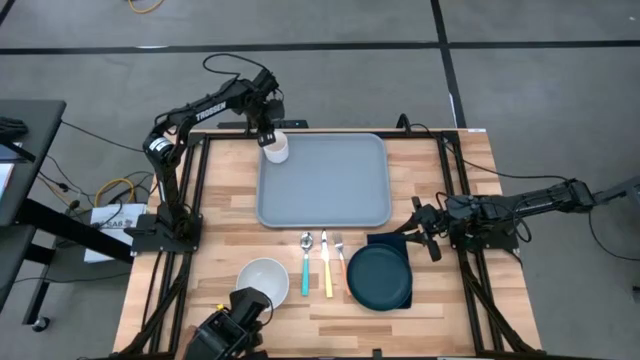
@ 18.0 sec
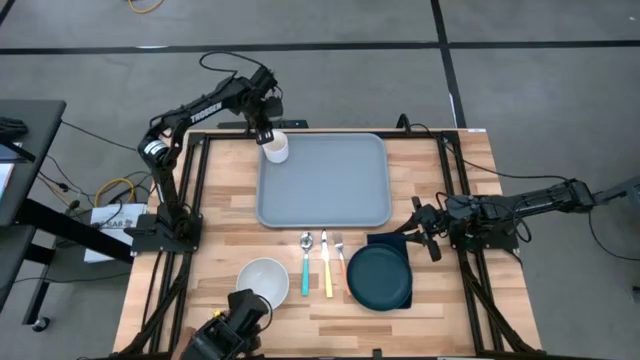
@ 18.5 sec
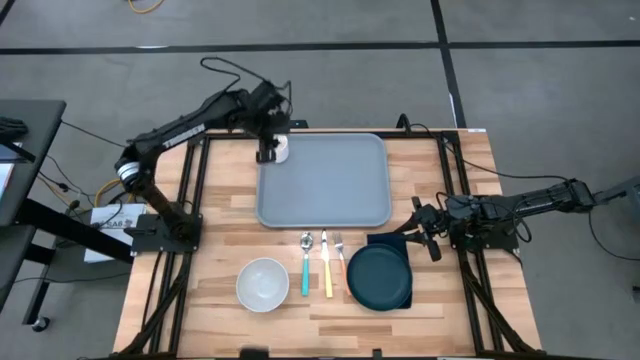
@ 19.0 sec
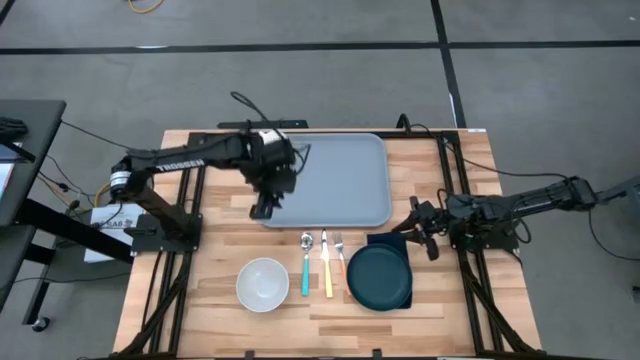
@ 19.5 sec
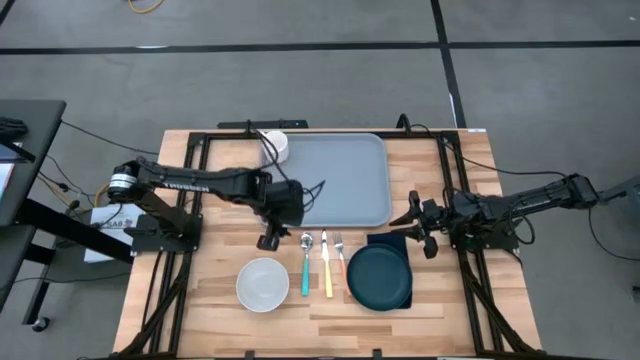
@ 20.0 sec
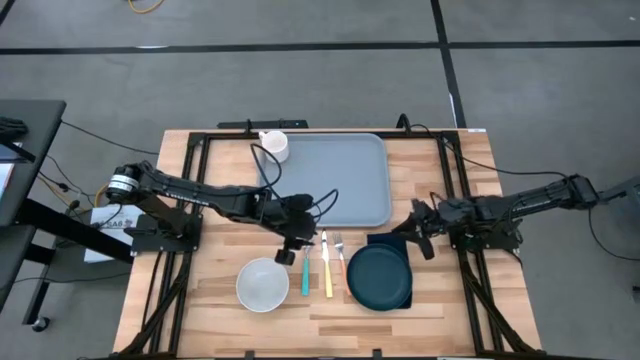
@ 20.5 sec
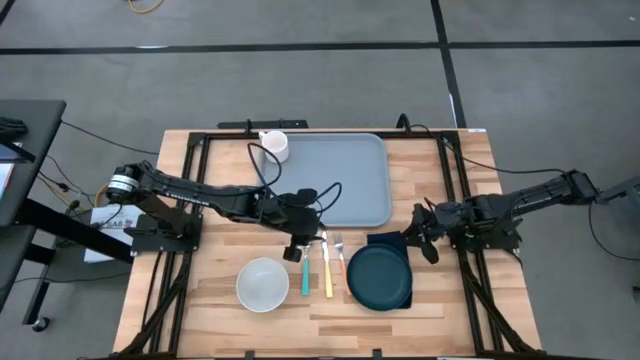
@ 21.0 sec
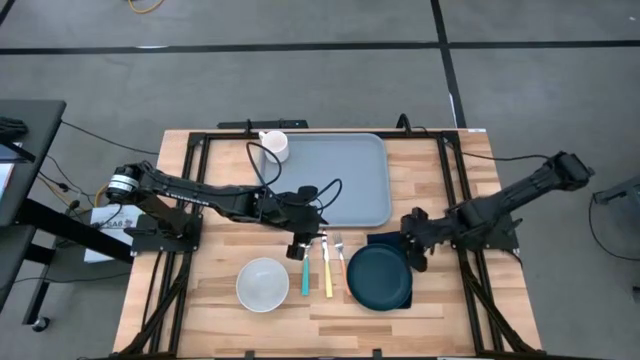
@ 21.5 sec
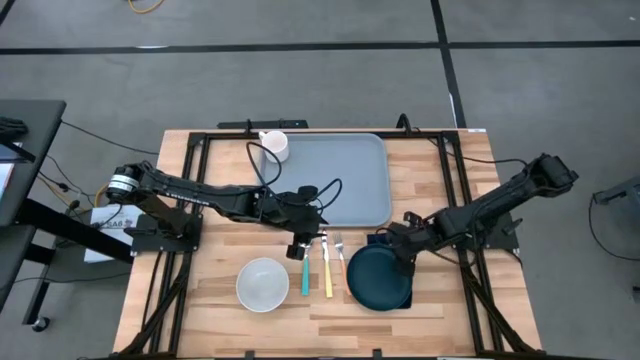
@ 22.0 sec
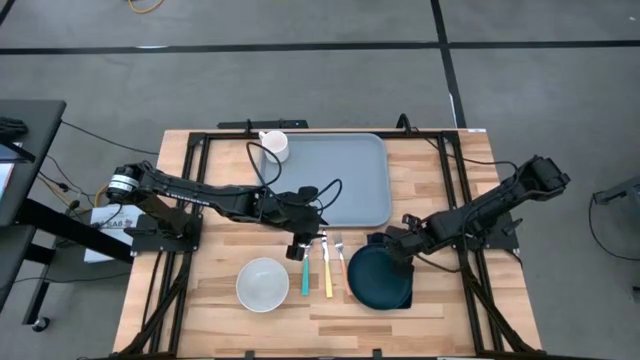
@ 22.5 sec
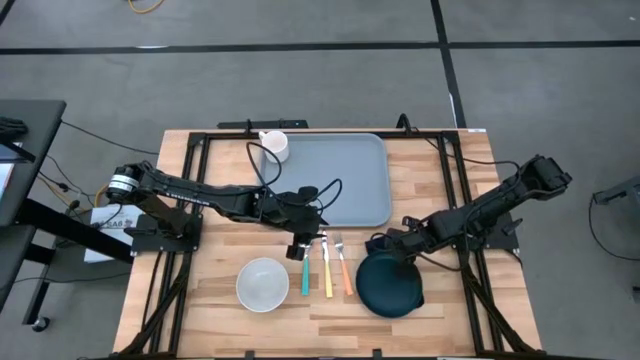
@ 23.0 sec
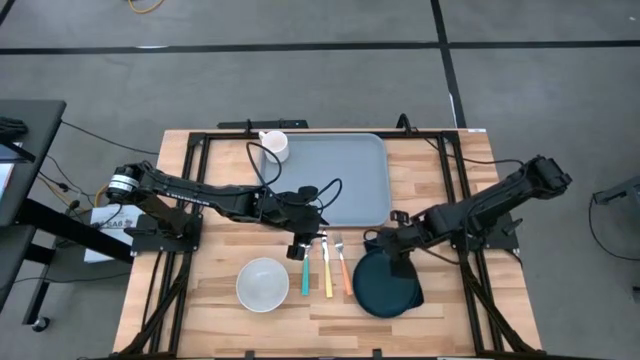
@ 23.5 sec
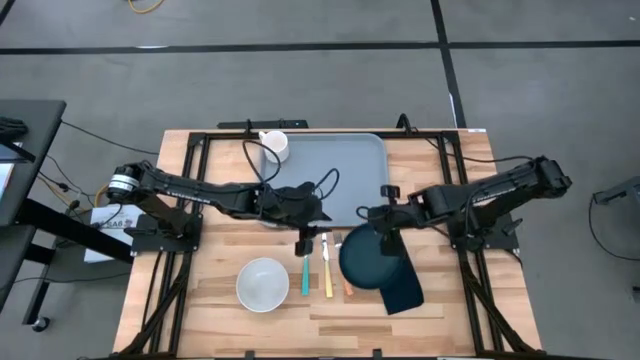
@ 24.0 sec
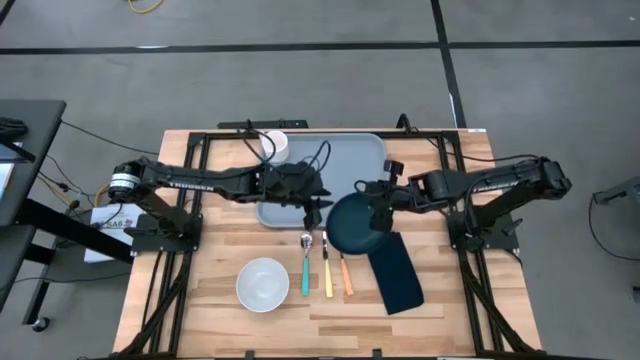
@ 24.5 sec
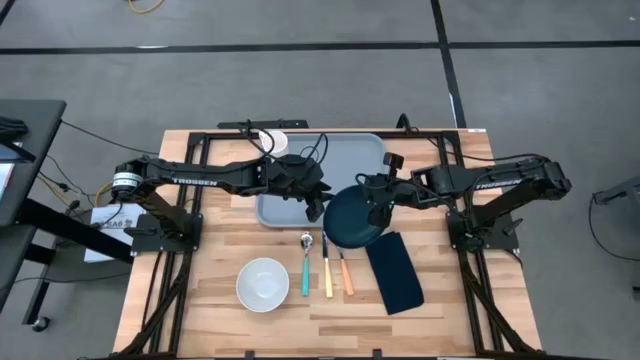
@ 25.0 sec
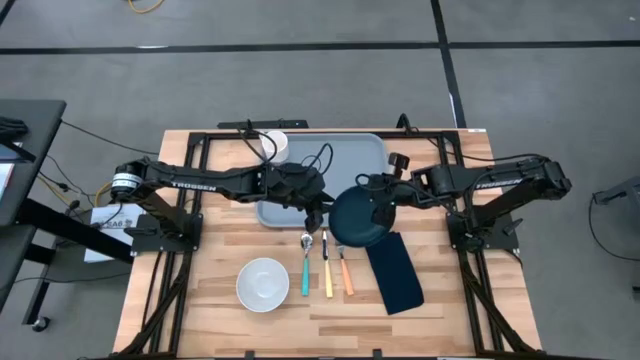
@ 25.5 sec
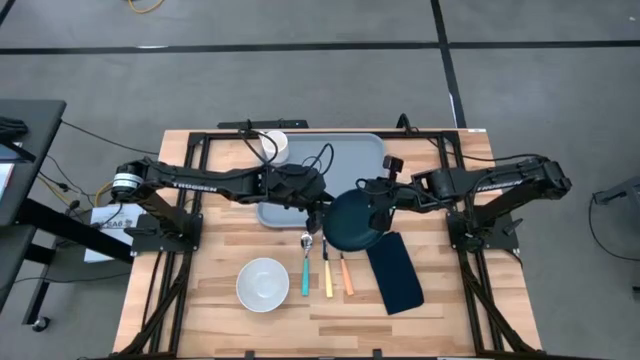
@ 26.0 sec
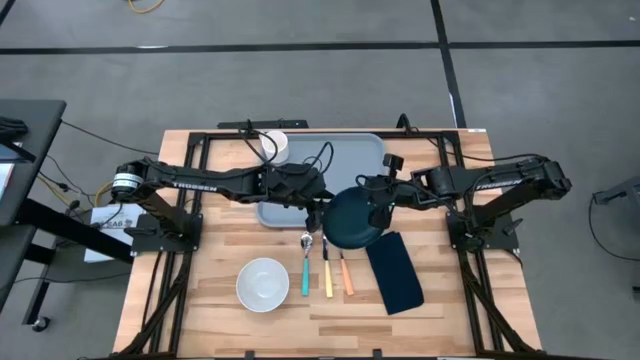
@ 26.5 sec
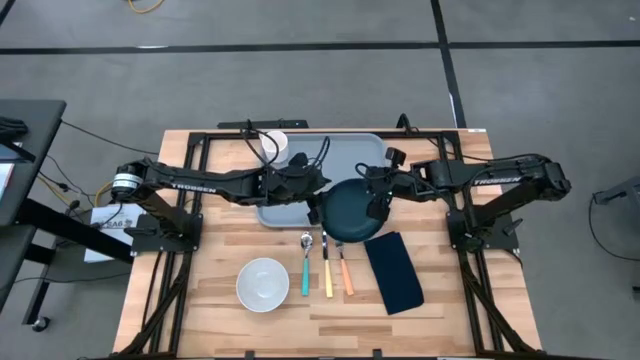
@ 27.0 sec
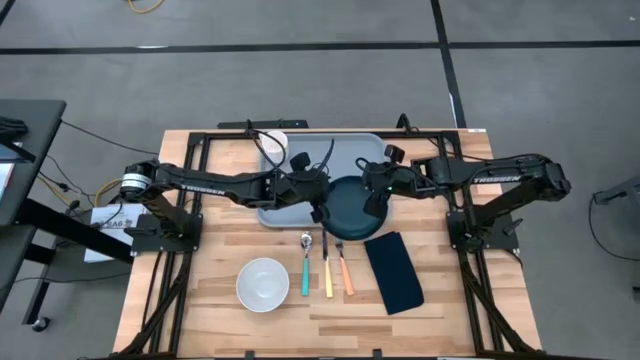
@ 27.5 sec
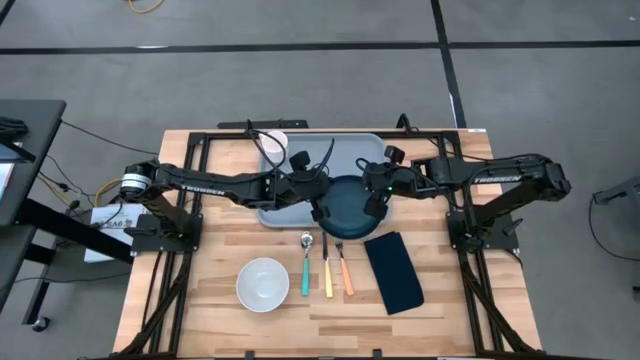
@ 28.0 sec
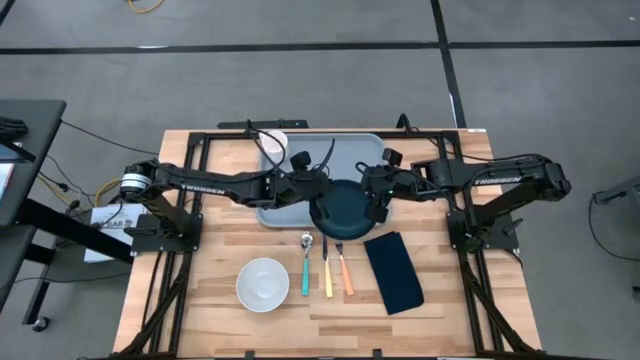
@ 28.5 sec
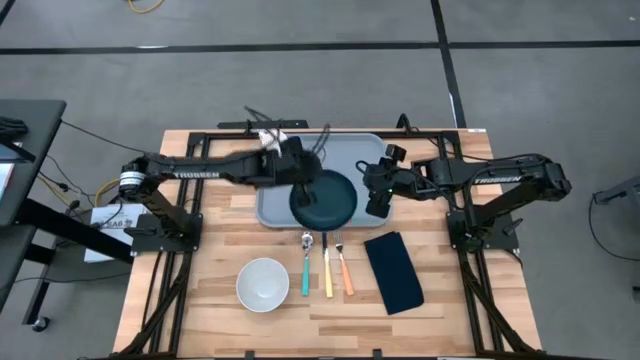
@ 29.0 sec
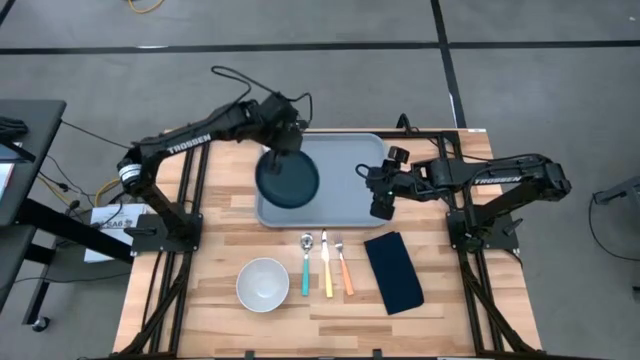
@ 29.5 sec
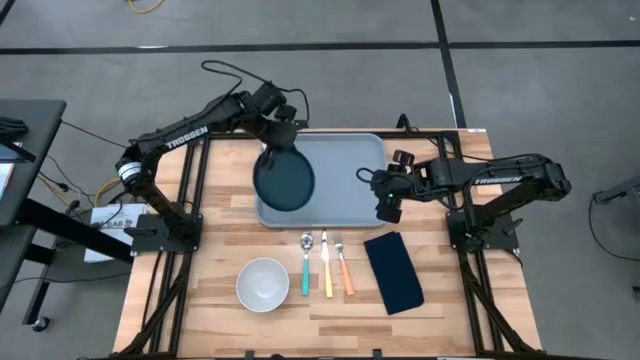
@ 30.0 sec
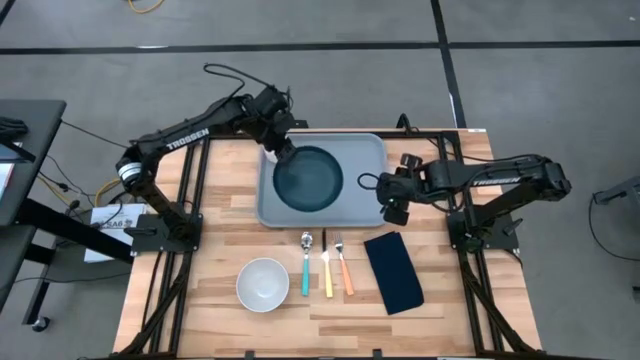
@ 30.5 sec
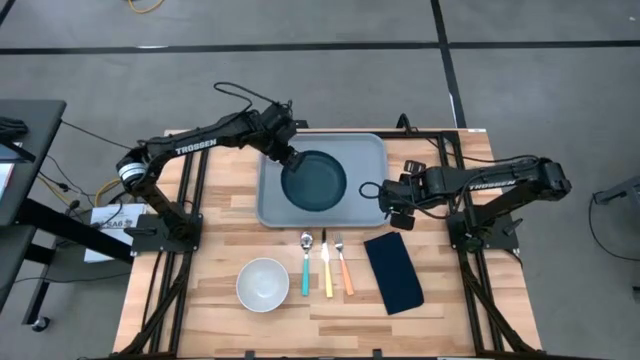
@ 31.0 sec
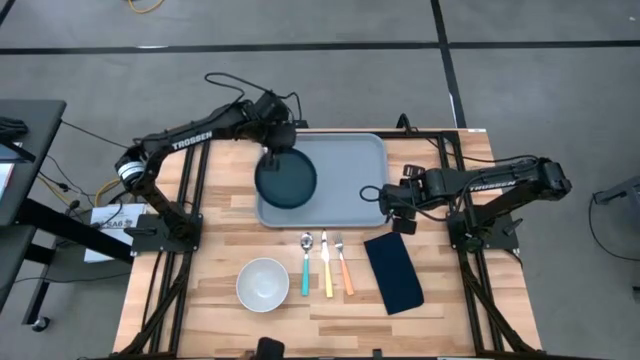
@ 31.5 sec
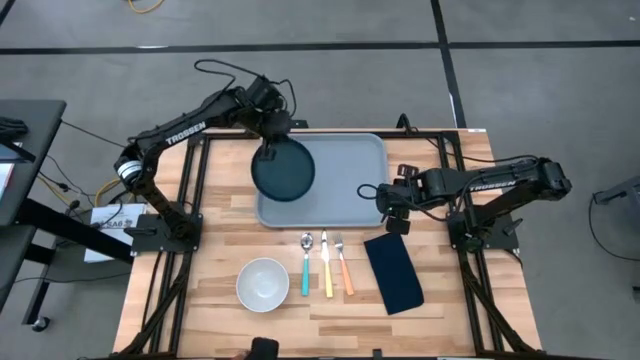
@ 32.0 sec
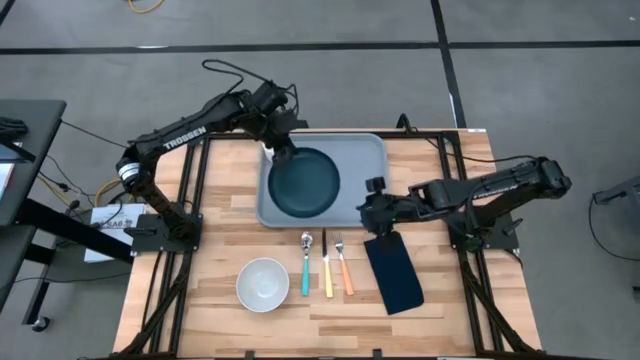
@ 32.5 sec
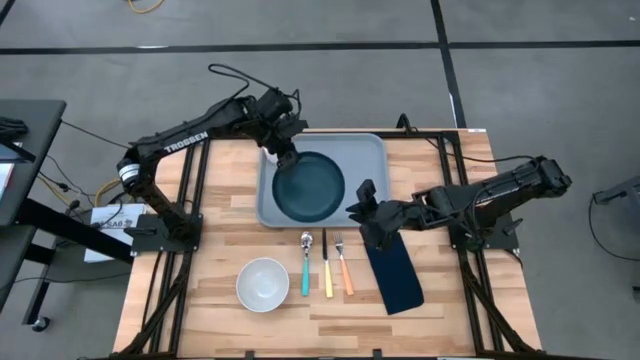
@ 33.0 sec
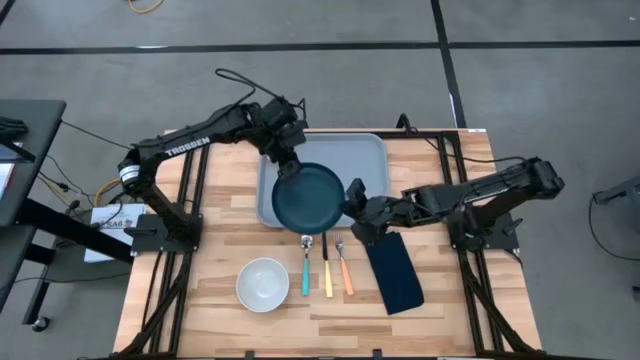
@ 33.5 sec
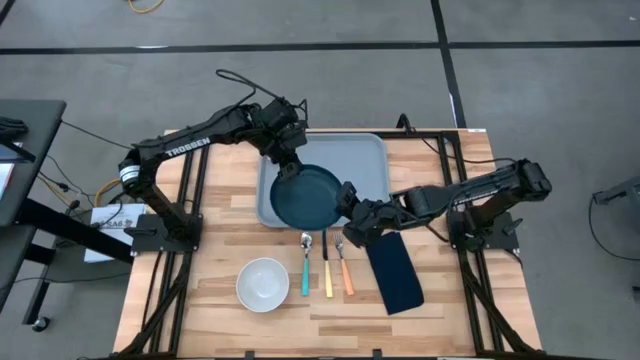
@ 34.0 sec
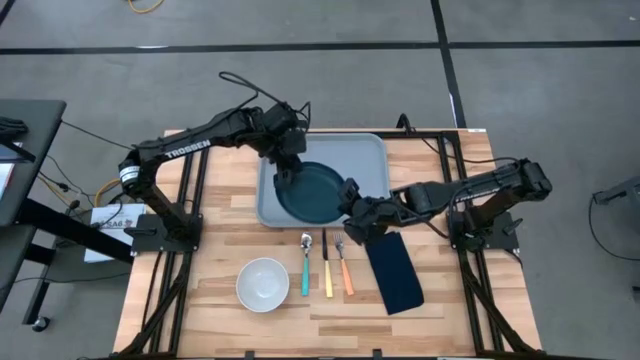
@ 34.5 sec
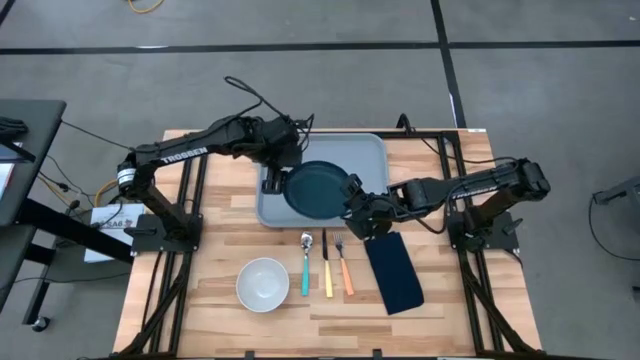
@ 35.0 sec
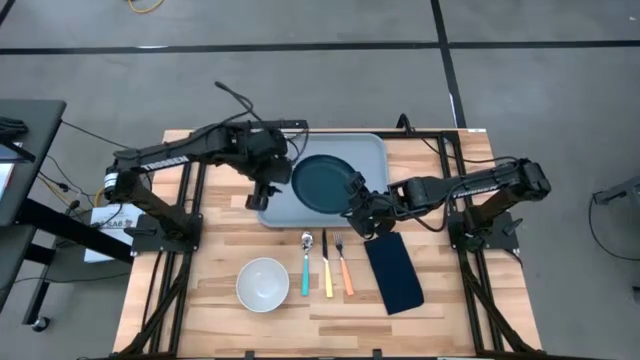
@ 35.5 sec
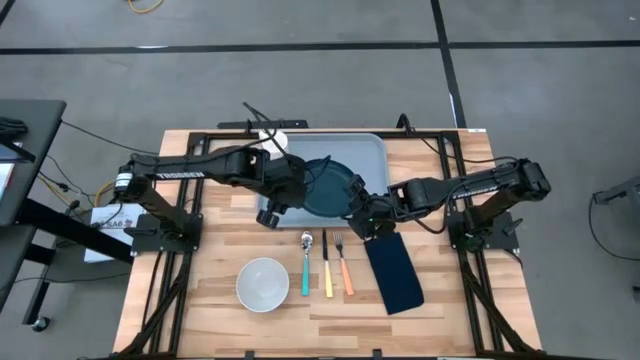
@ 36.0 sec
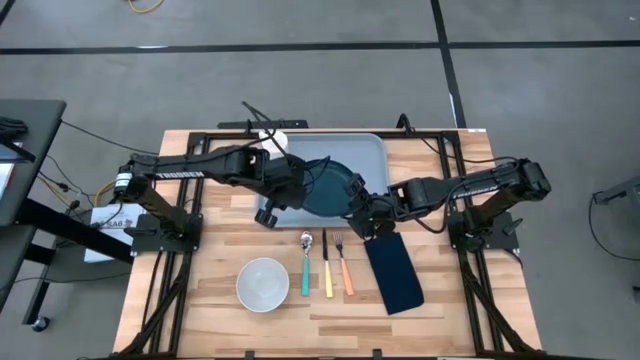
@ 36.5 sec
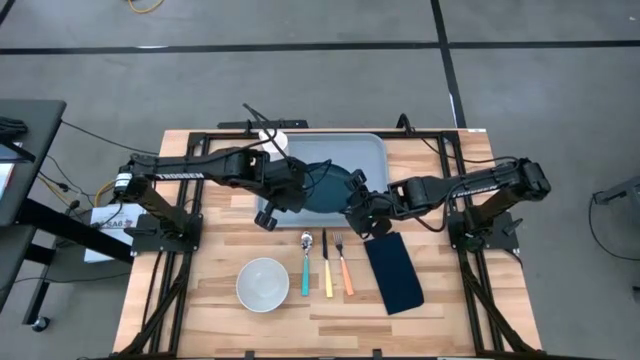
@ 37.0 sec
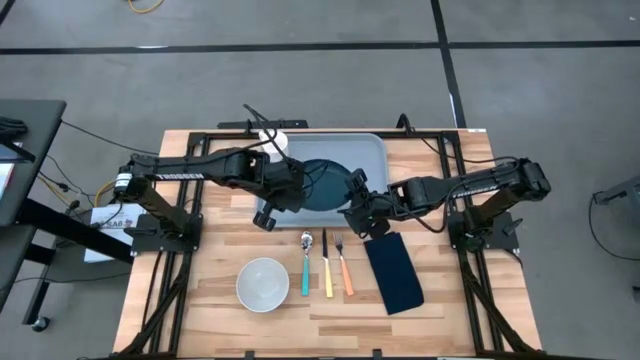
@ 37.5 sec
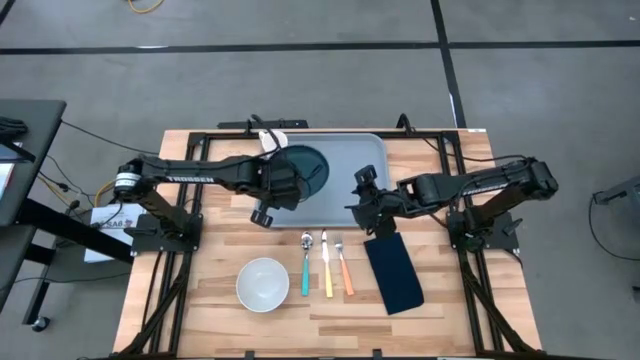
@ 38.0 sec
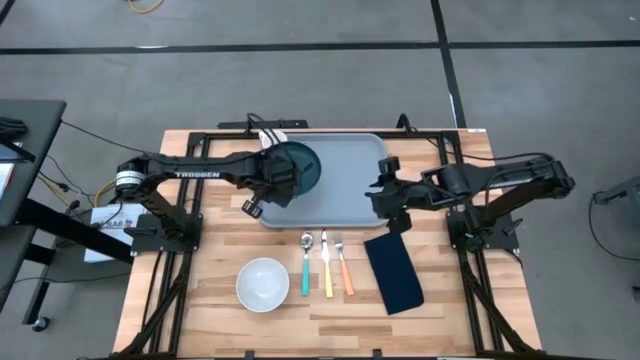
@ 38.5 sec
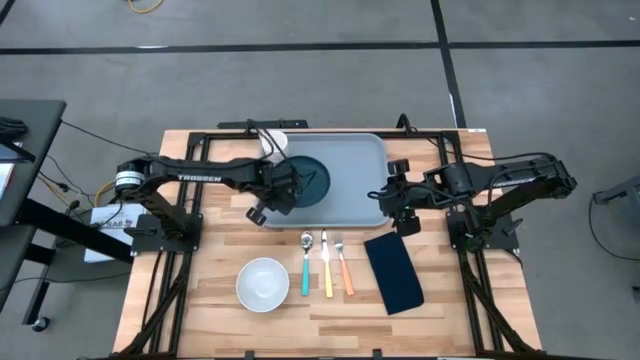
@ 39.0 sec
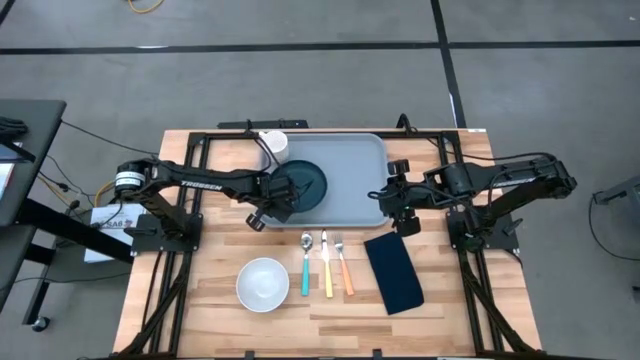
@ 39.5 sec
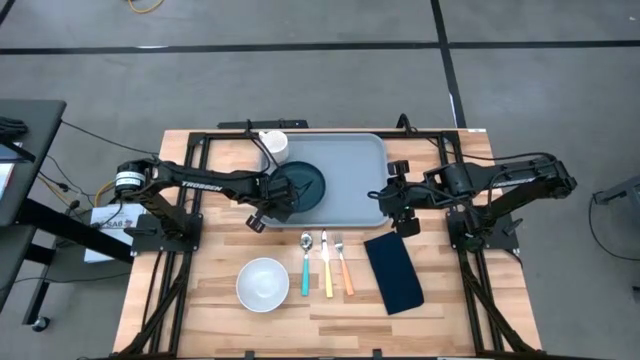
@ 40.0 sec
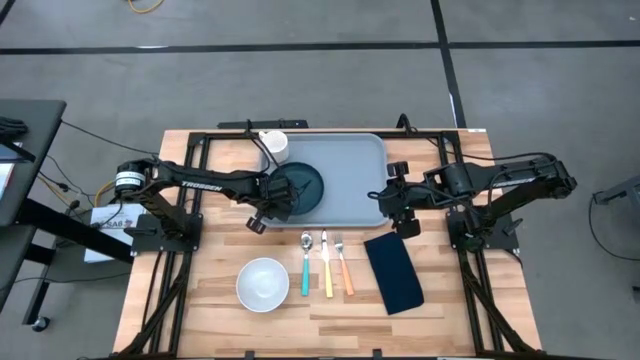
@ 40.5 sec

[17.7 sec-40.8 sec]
Task: Set up tray
Put the black plate on the gray tray below the white mug
